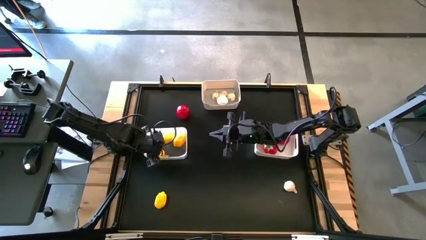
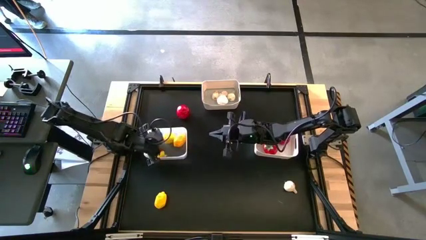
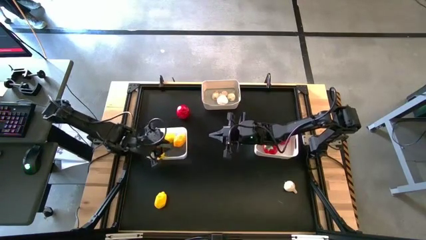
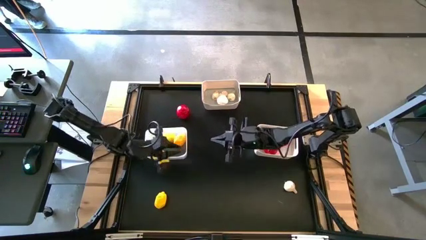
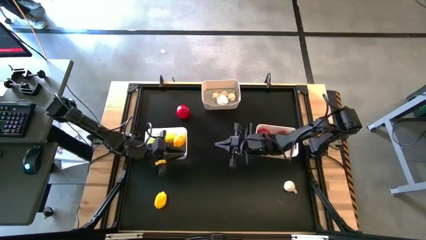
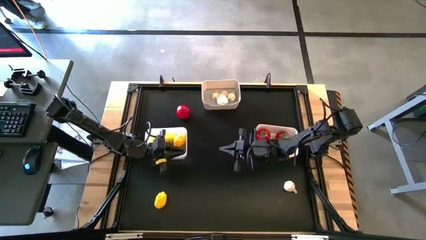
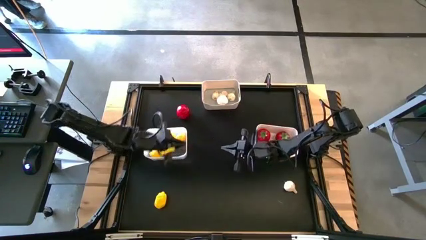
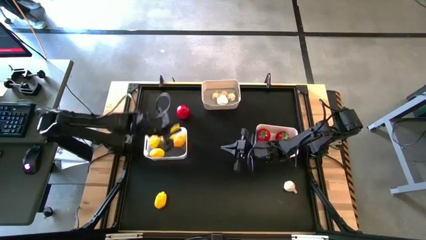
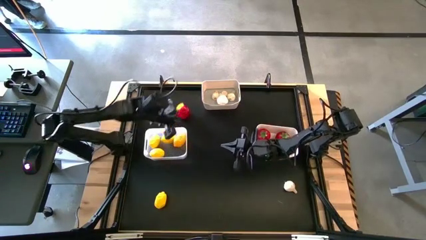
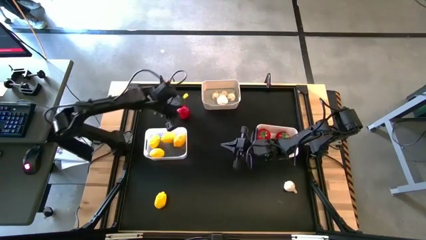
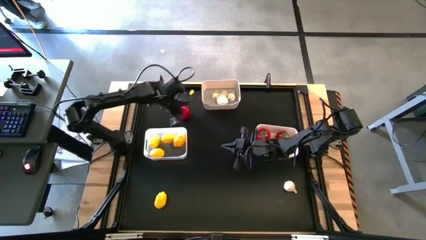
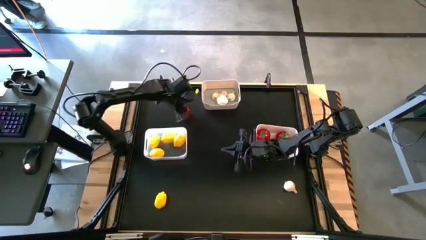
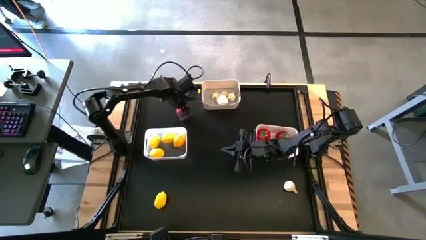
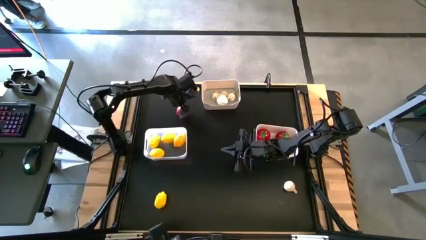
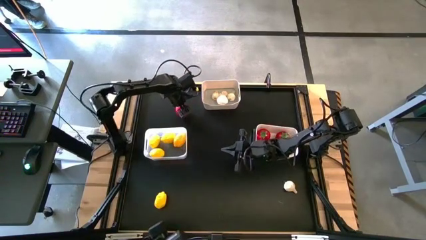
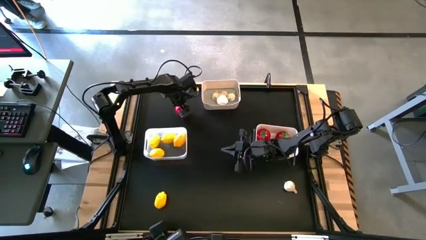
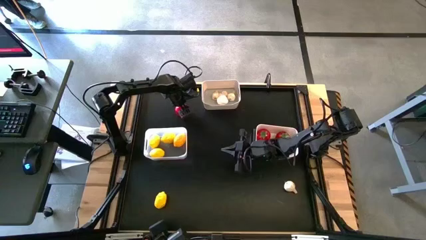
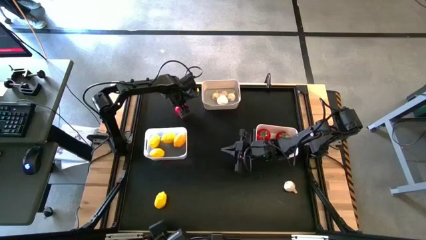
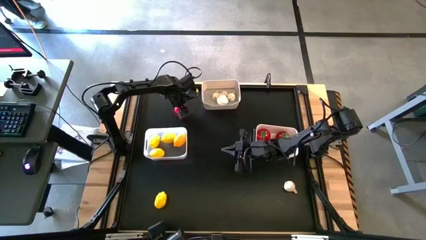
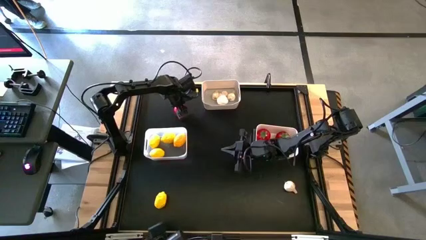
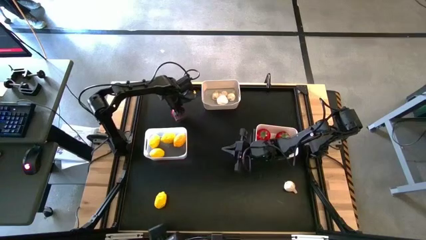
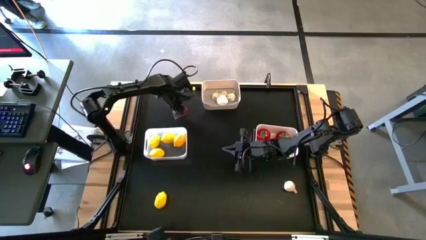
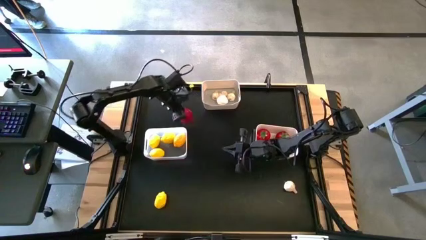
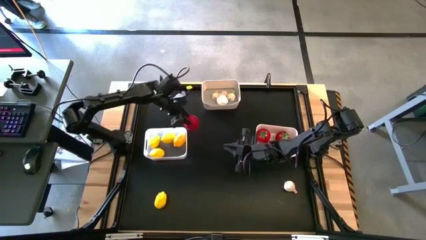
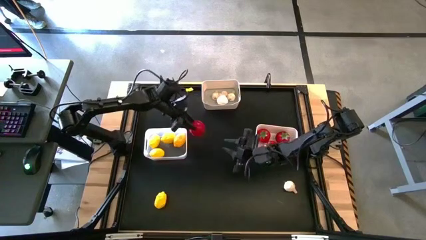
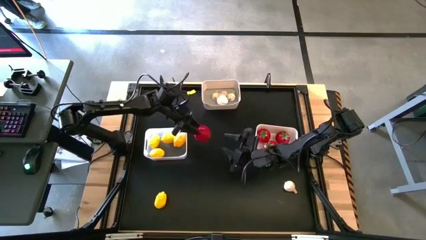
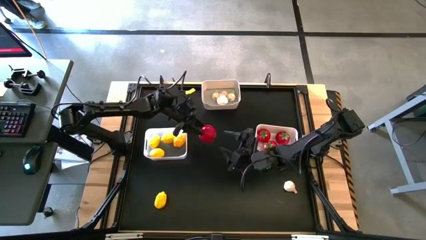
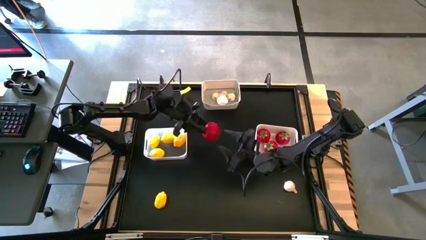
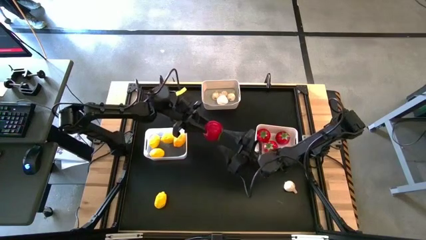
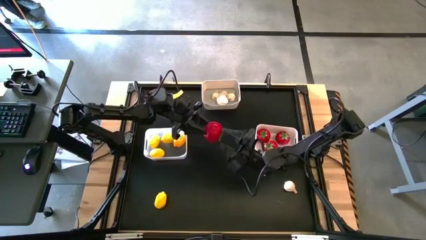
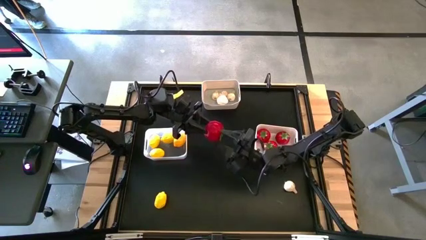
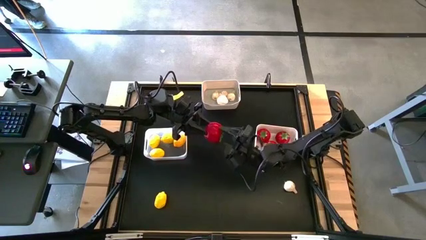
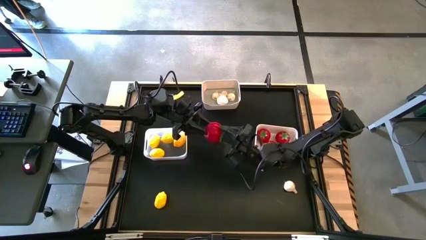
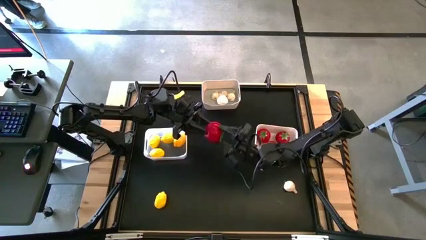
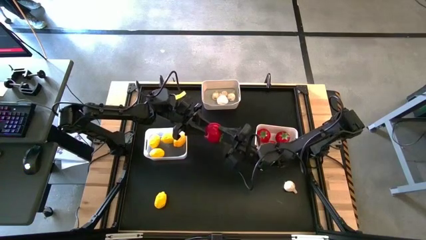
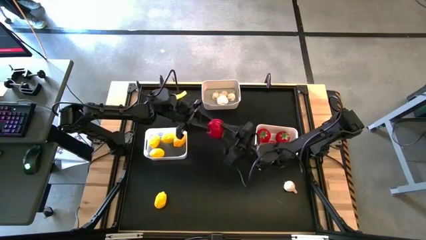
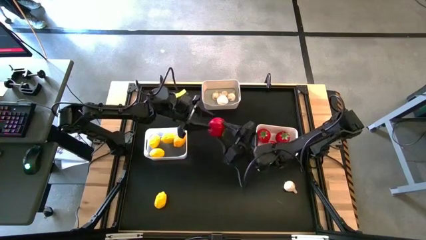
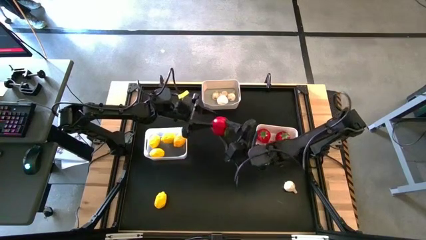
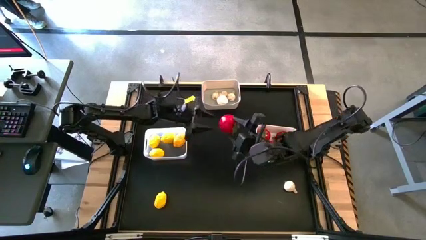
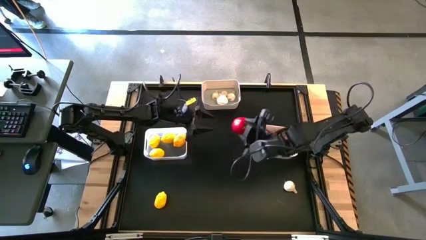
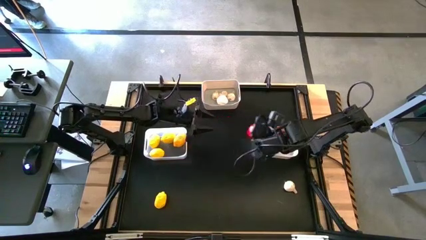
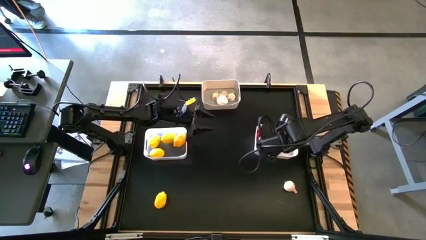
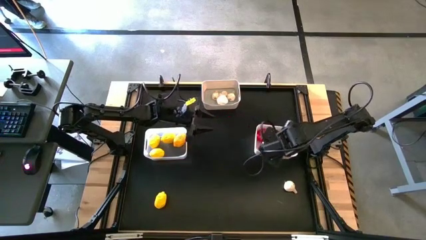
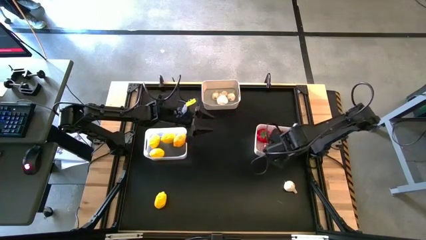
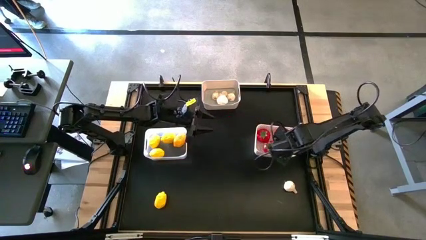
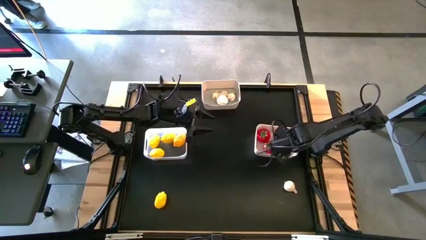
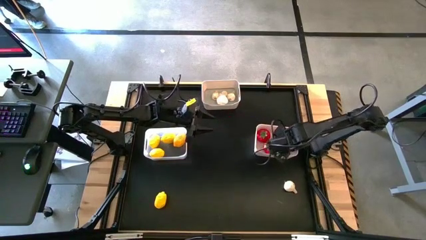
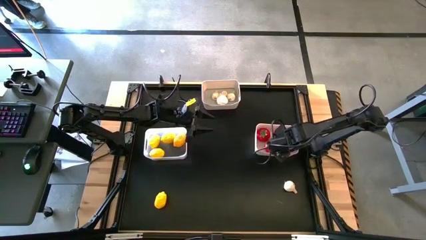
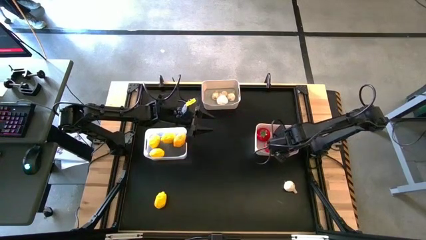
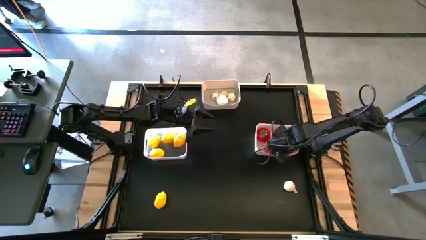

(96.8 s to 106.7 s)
Task: Sort produce into baskets
Put the red tomato into the bottom right white bin

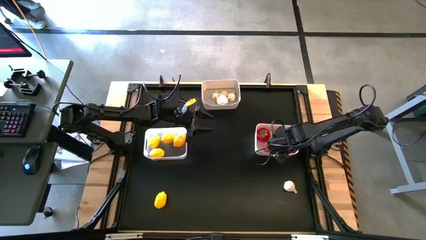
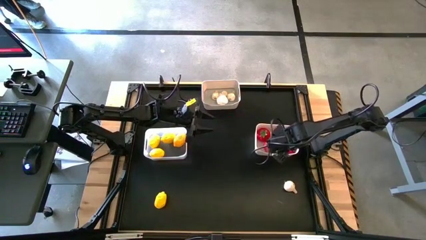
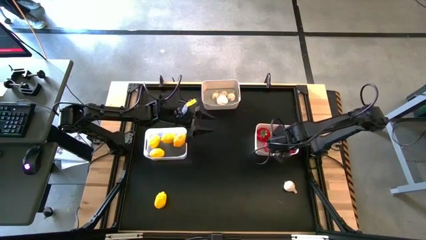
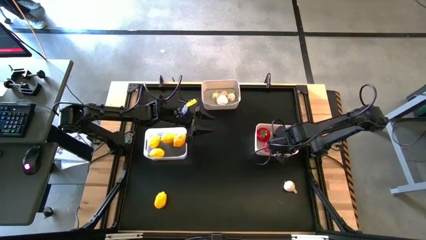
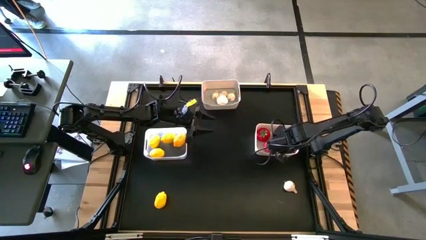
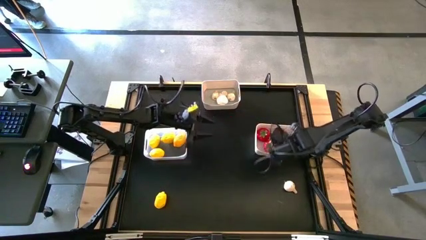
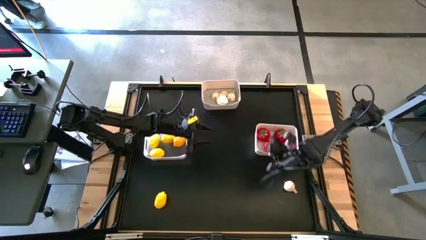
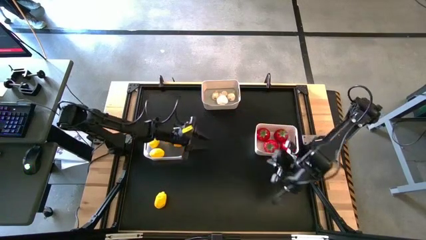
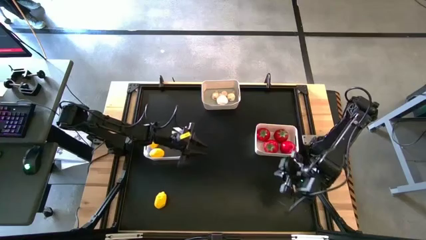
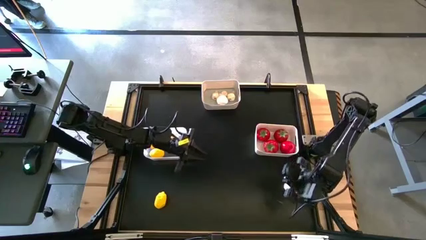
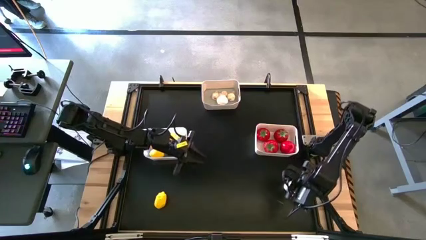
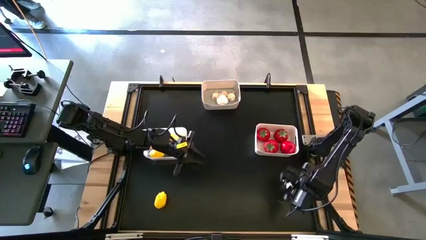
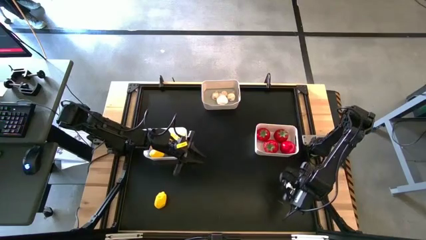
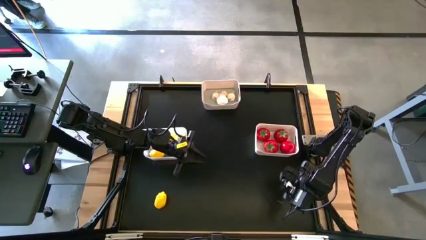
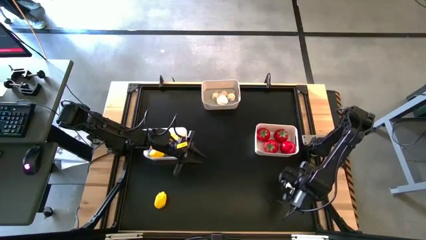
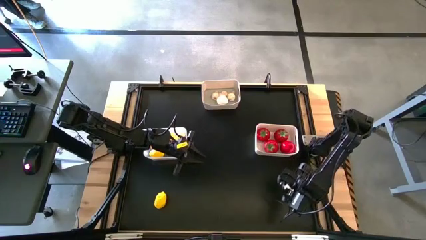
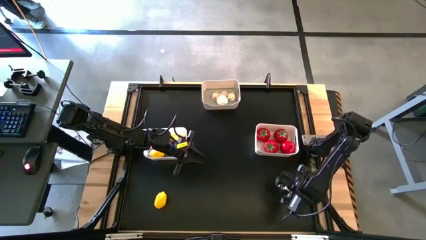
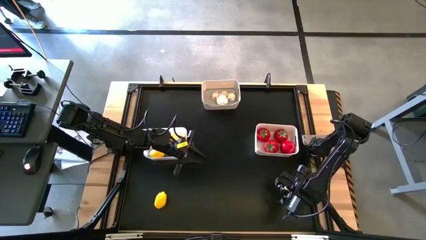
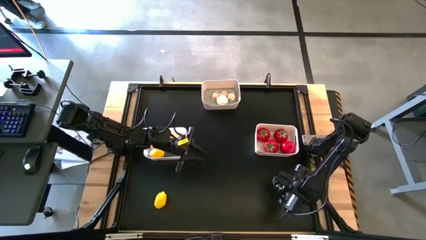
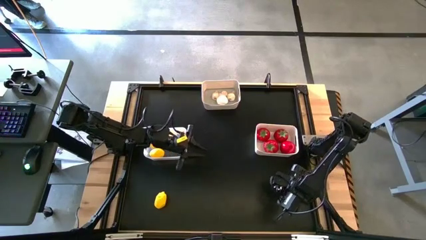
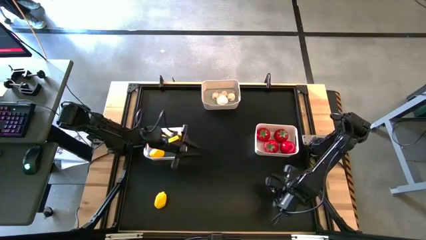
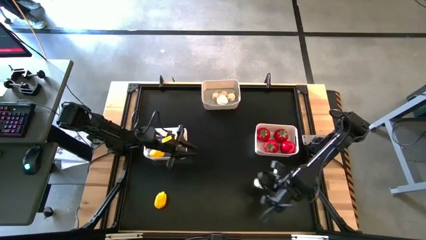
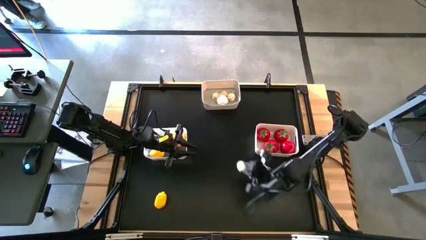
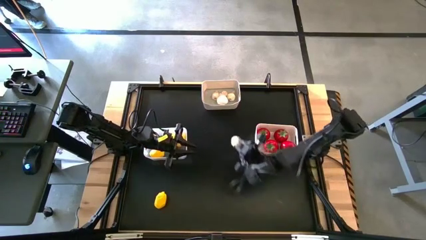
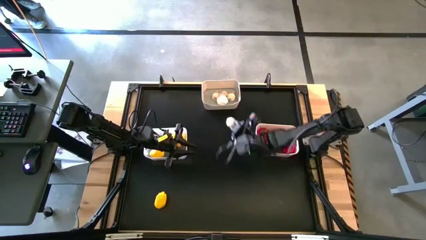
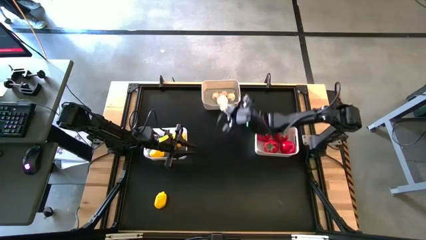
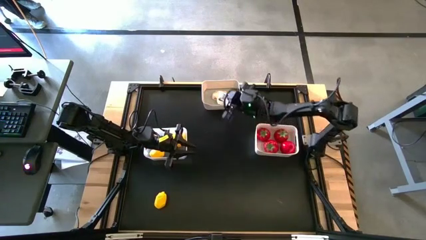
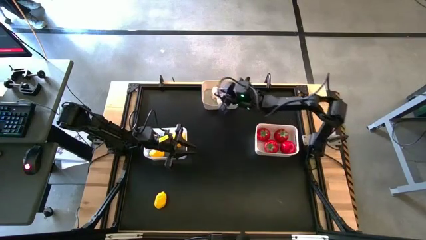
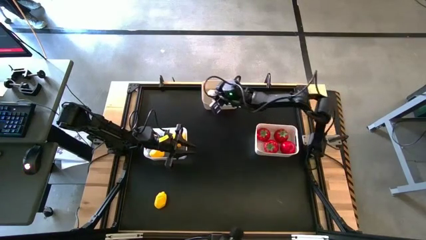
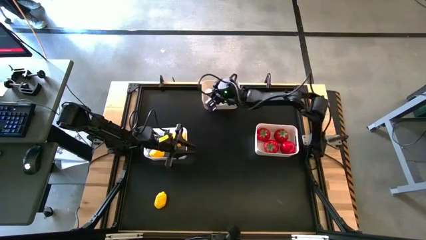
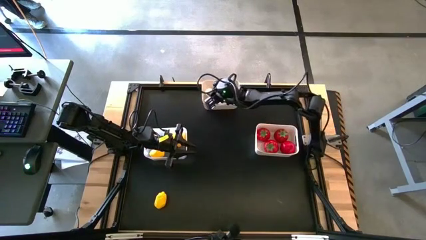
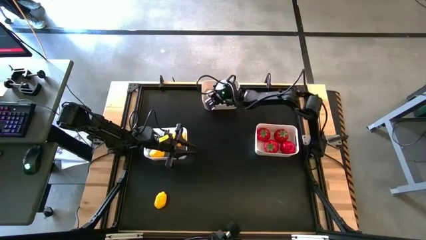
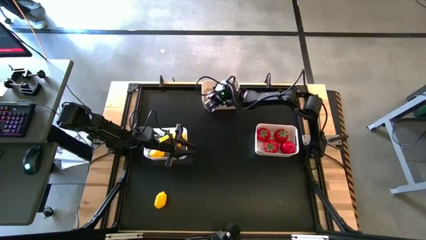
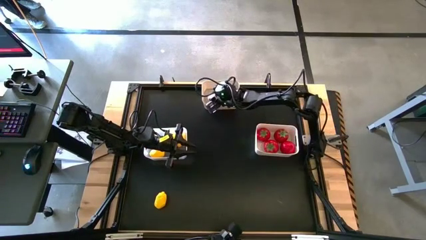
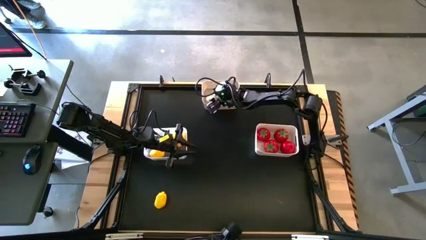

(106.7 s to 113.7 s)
Put the white garlic into the top left white bin
